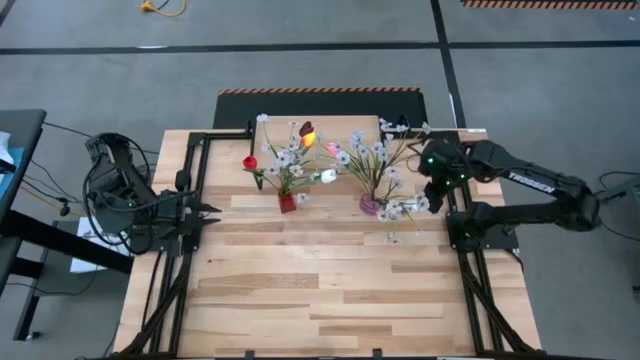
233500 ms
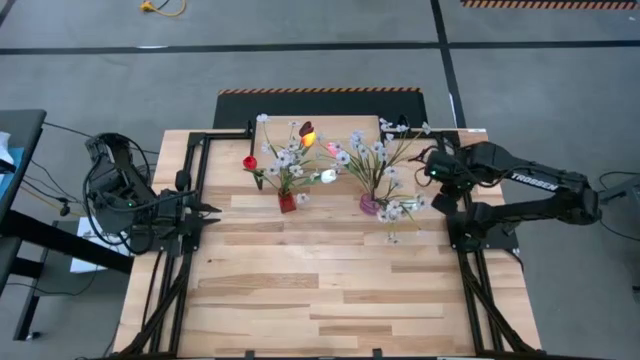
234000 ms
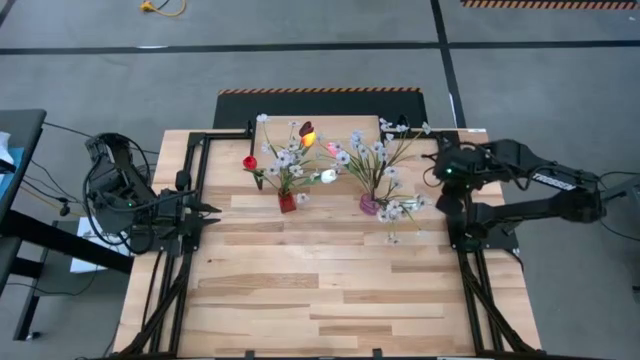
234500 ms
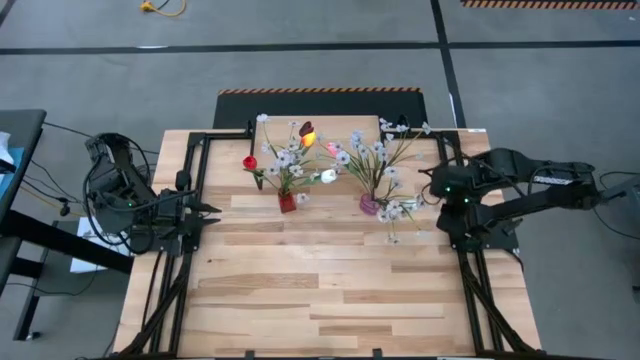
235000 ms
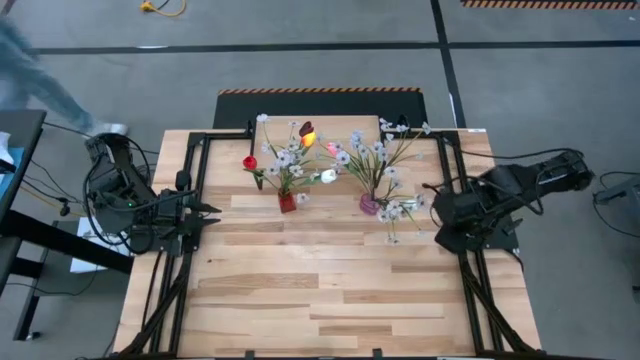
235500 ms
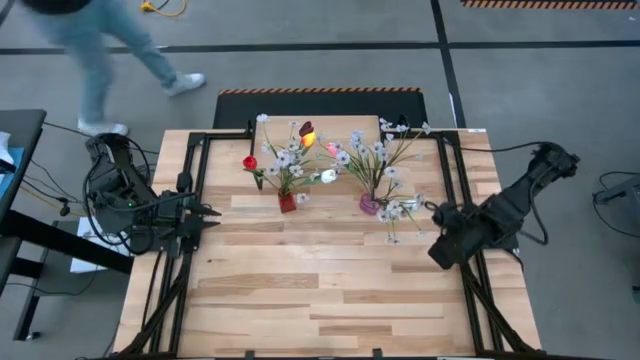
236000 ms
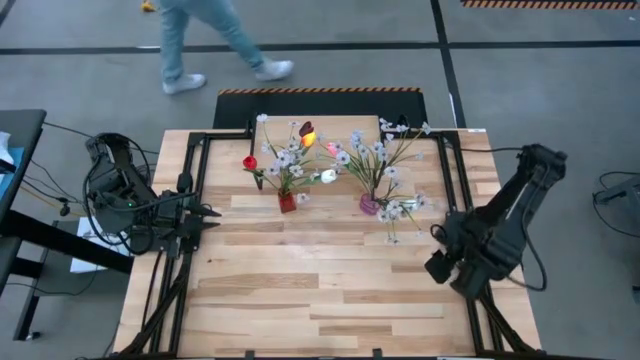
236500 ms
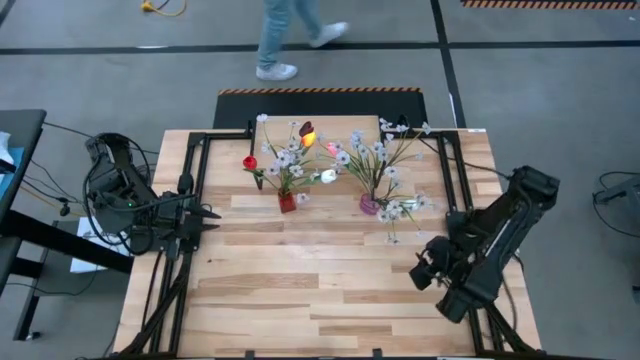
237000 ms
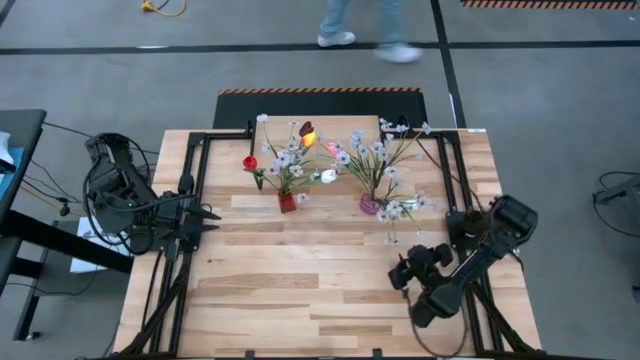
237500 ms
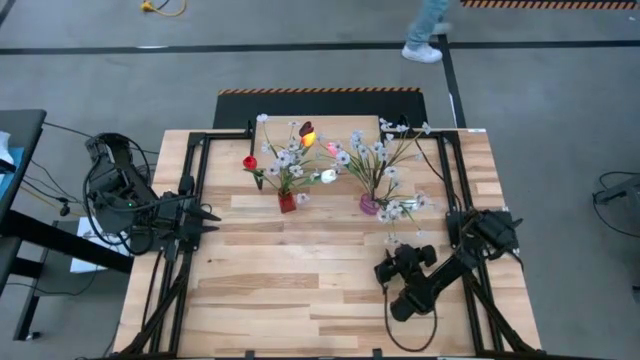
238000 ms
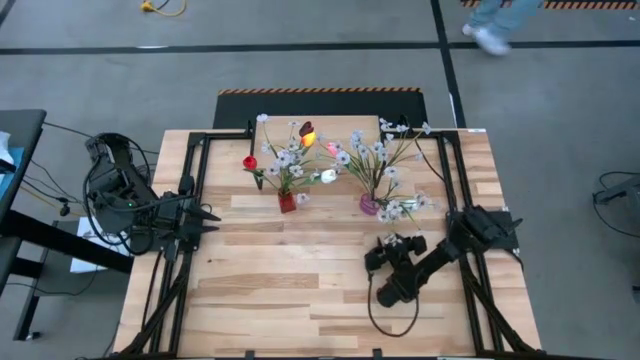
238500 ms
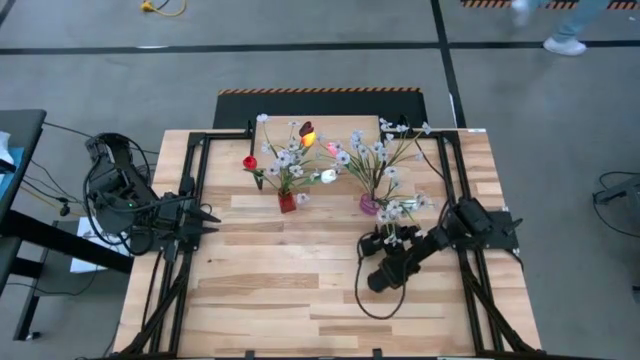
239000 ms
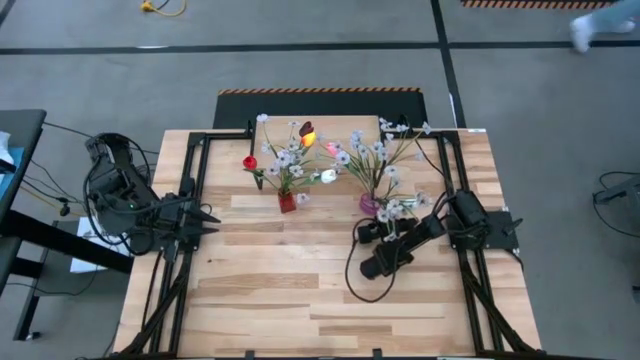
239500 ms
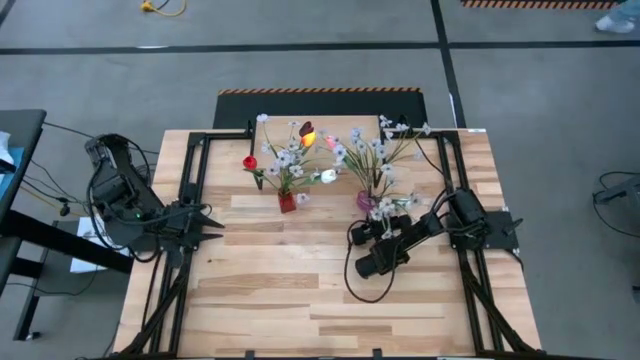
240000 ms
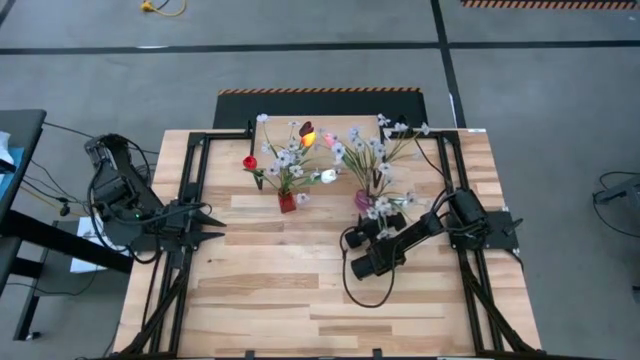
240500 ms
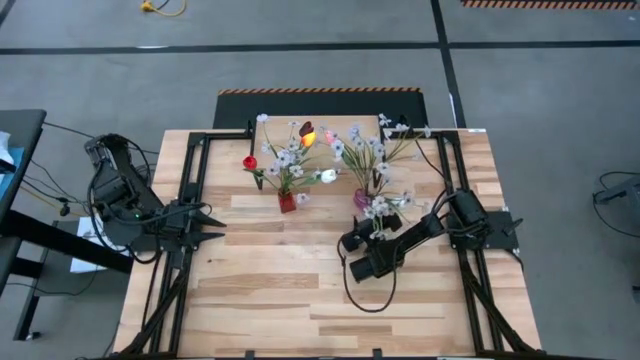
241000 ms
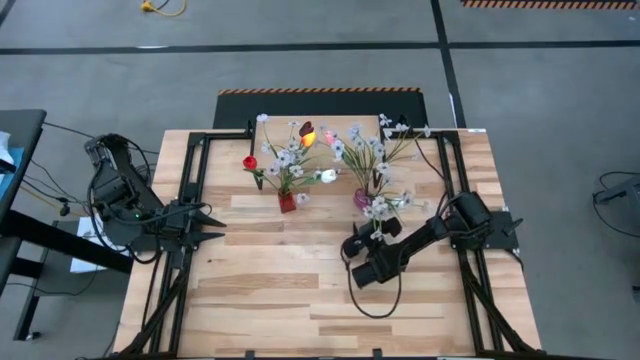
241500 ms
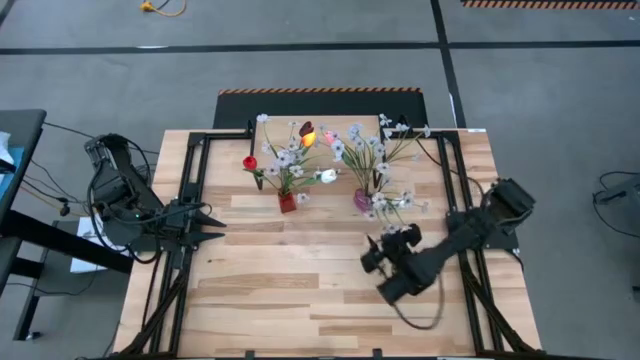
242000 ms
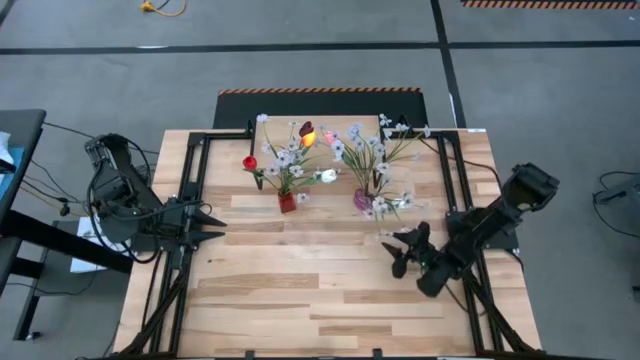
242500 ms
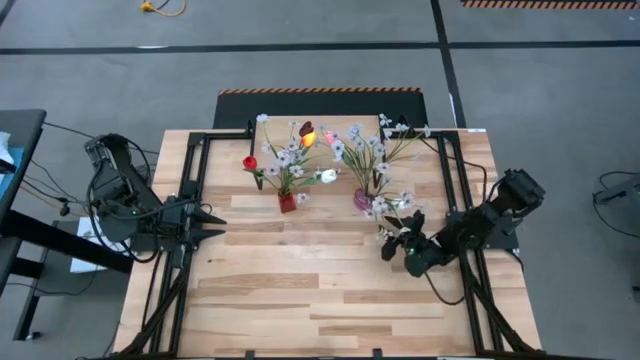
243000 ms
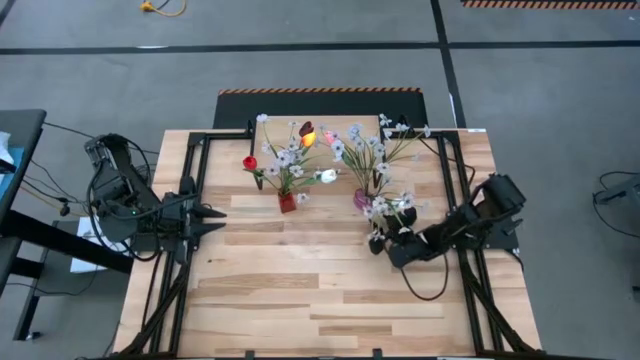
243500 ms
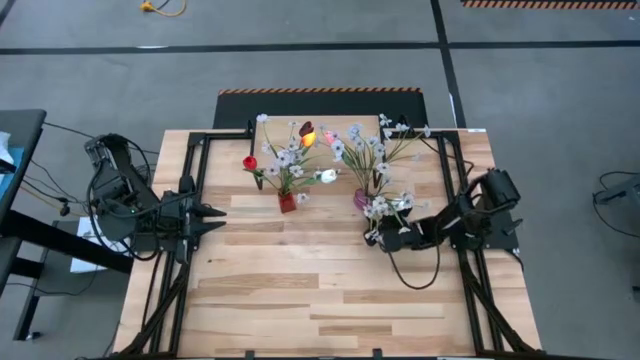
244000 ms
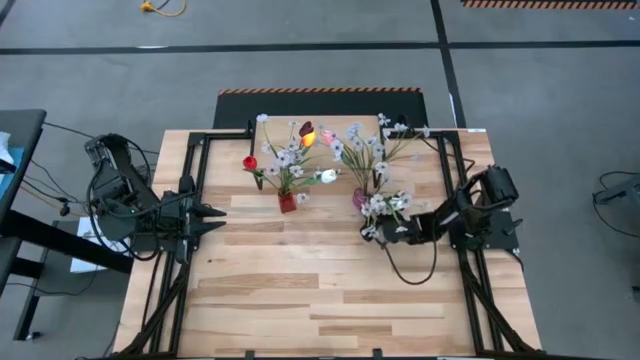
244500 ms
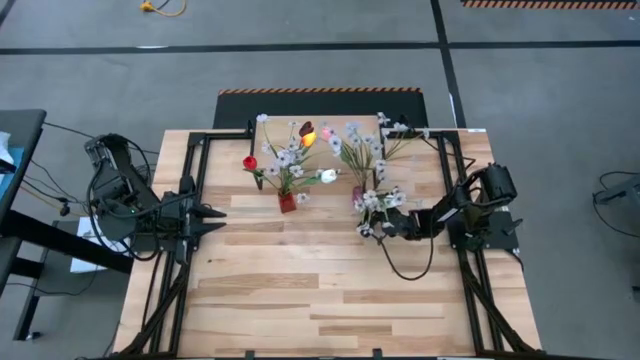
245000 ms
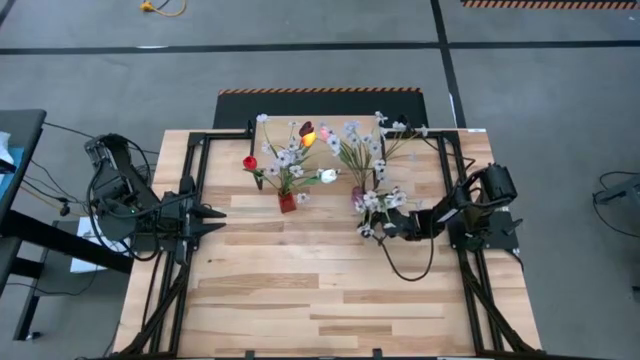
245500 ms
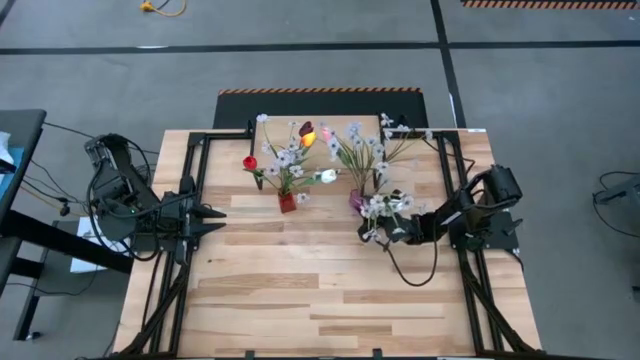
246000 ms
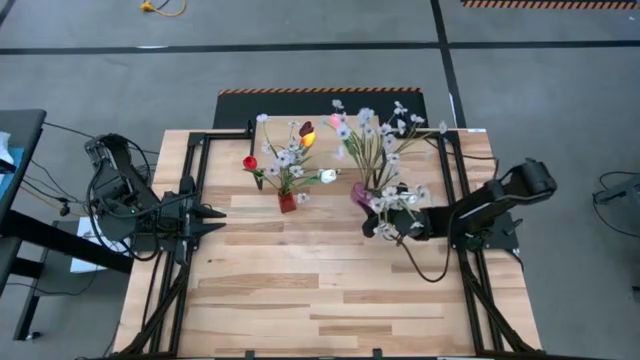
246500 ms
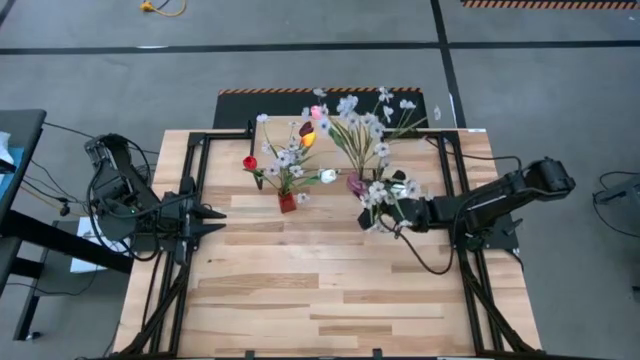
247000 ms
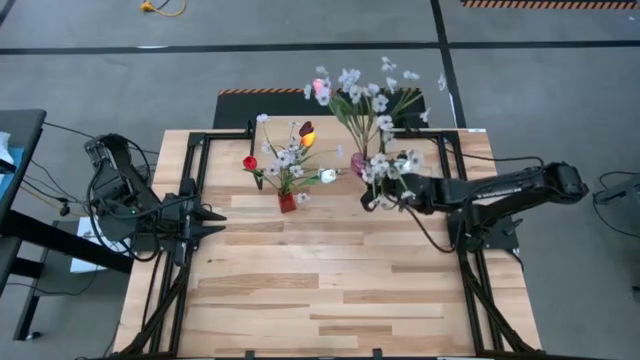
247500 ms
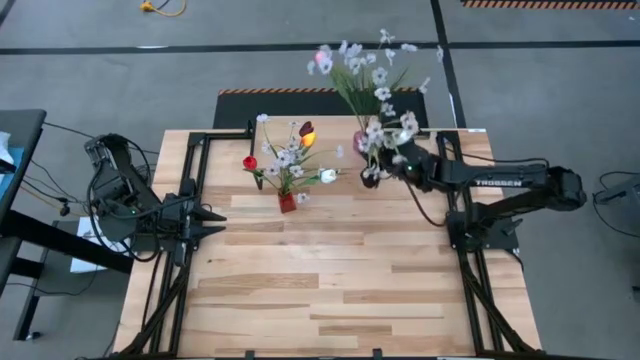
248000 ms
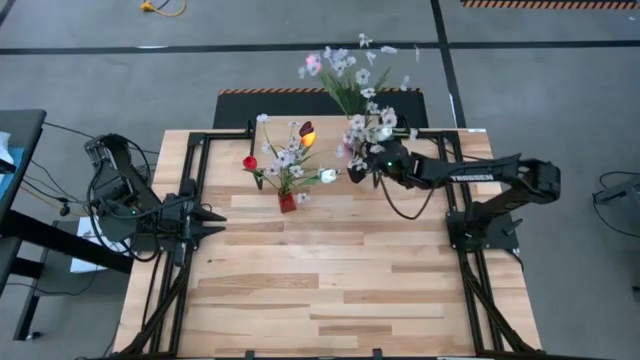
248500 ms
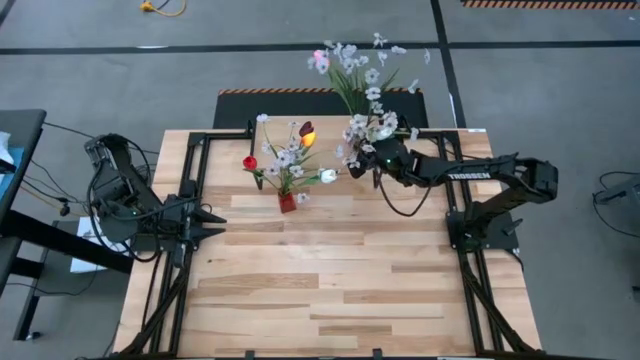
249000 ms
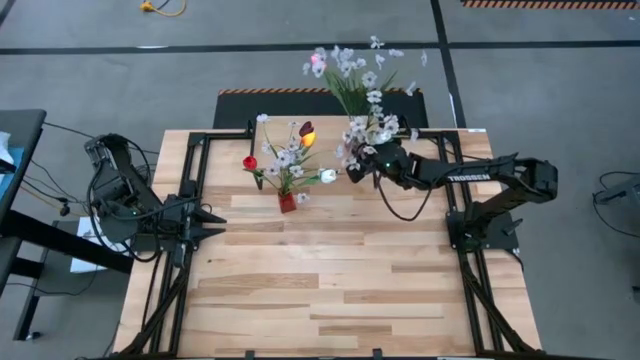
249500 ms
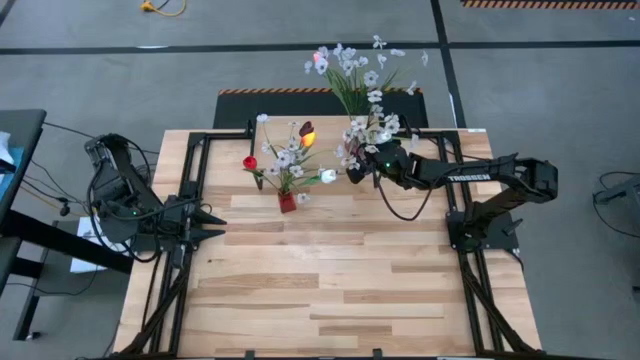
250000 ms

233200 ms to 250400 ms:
Task: Pick and place flowers into a vace then onto a shelf
Put the pink vase on the shelf

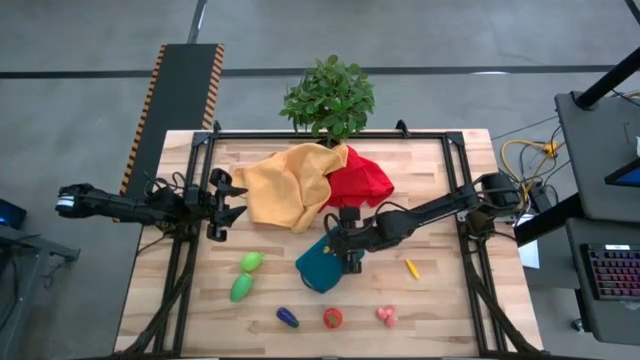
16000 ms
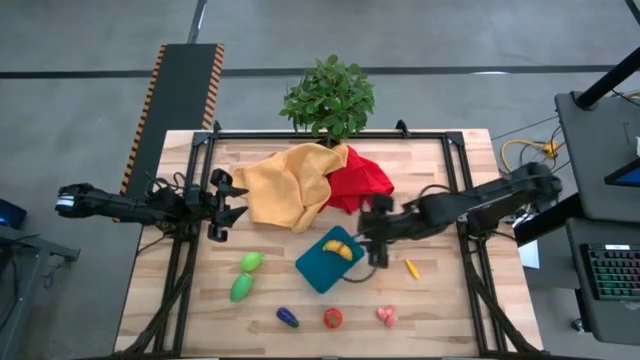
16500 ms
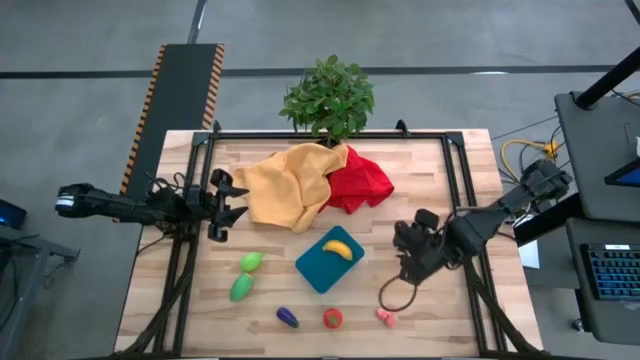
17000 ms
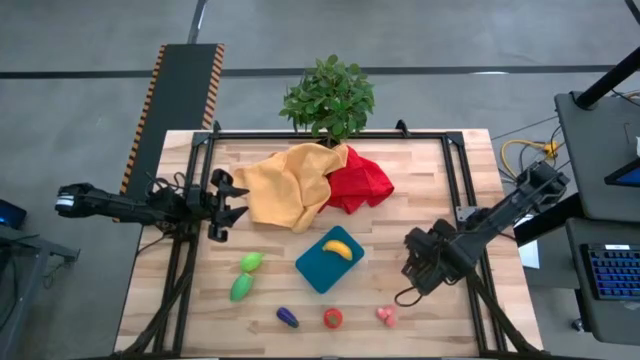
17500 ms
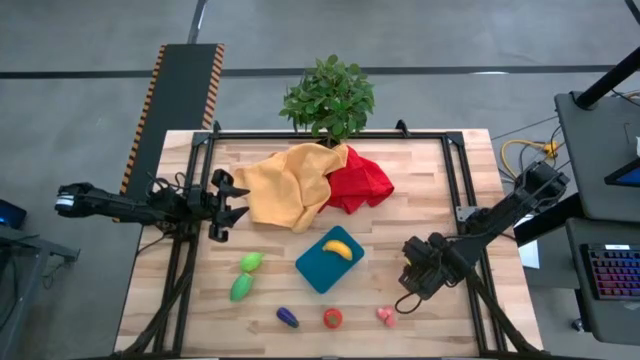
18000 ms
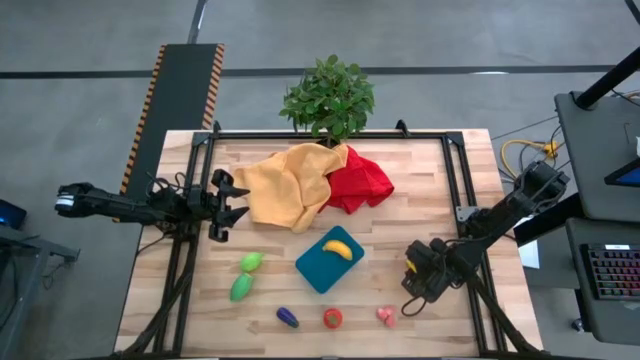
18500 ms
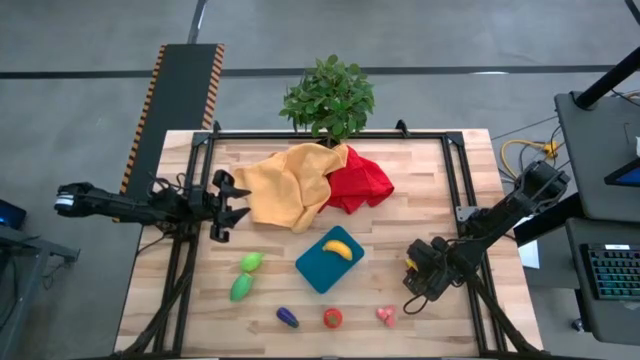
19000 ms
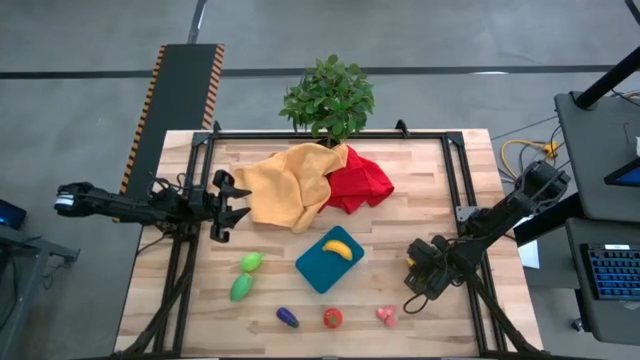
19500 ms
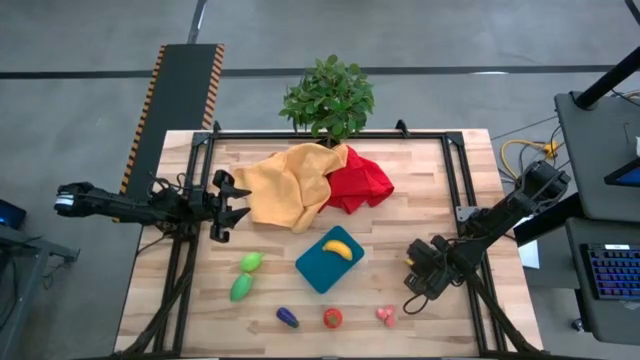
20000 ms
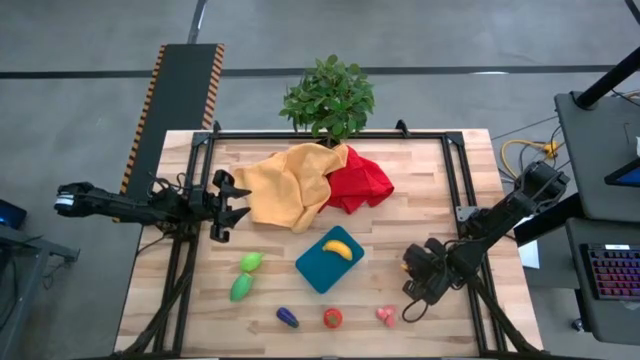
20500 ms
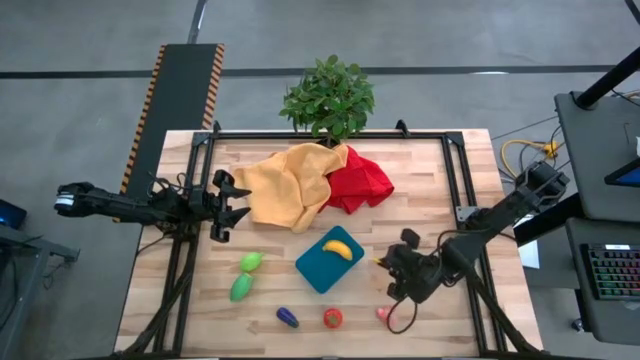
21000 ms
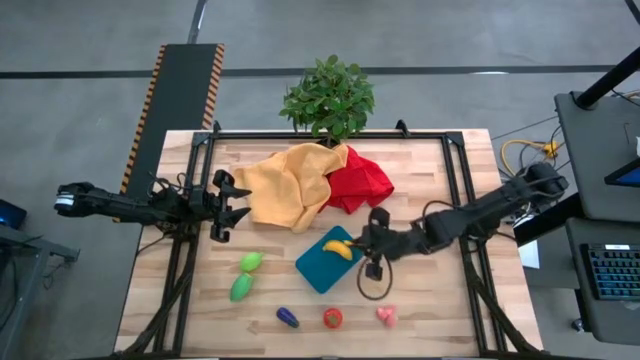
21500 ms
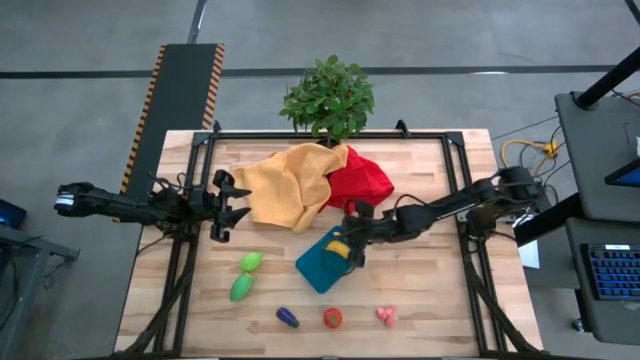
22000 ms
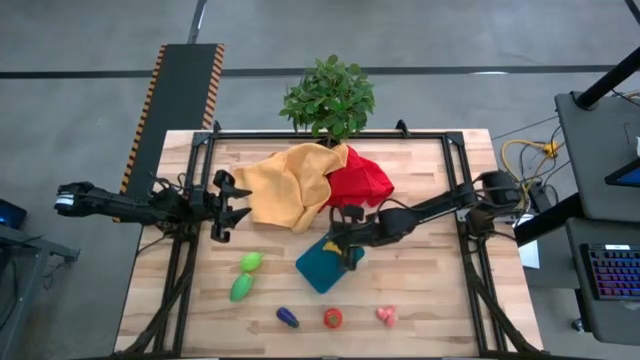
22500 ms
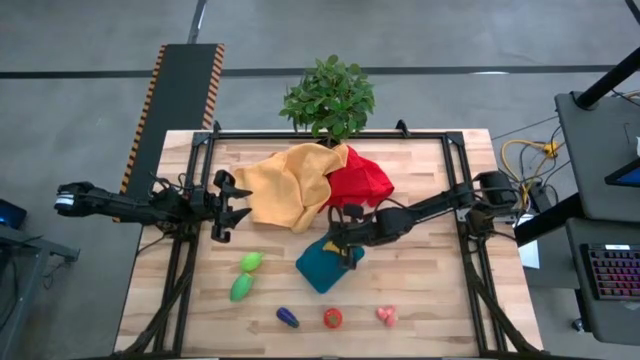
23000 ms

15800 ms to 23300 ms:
Task: Pick and placing Produce into tupperware
Put the yellow corn into the blue bin
